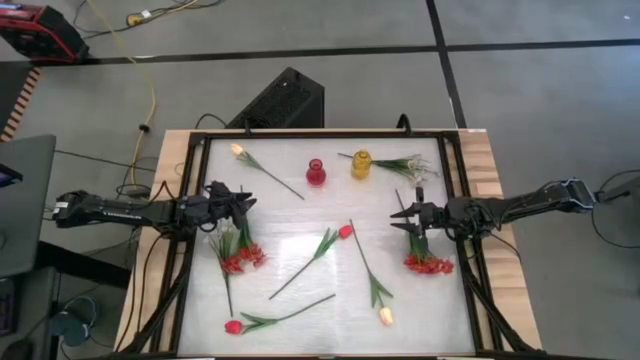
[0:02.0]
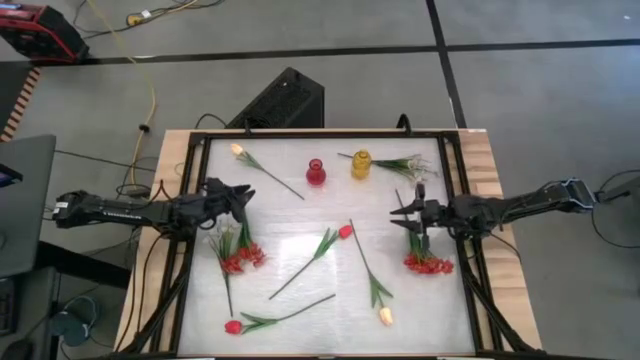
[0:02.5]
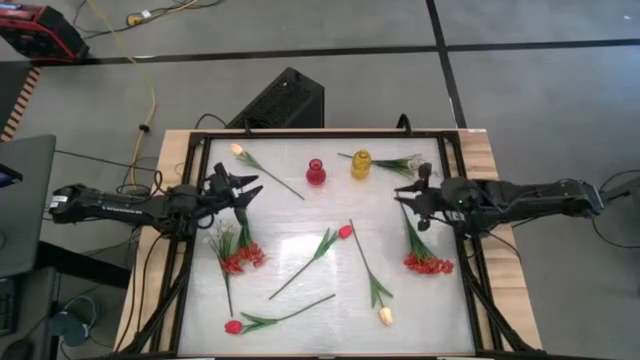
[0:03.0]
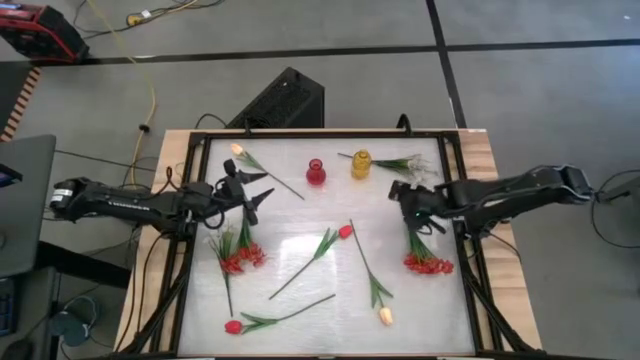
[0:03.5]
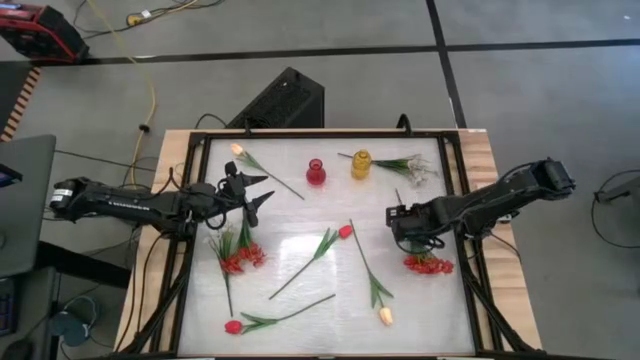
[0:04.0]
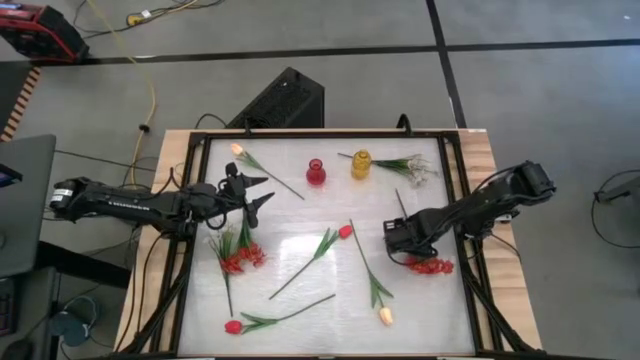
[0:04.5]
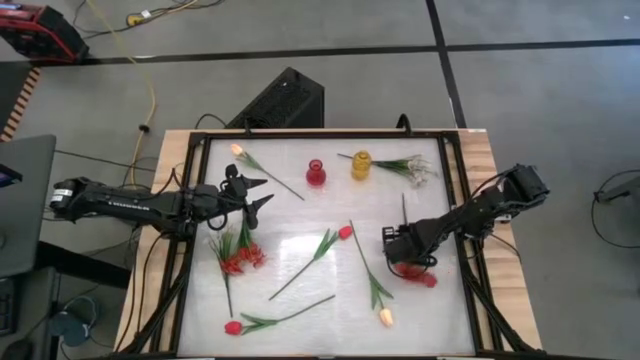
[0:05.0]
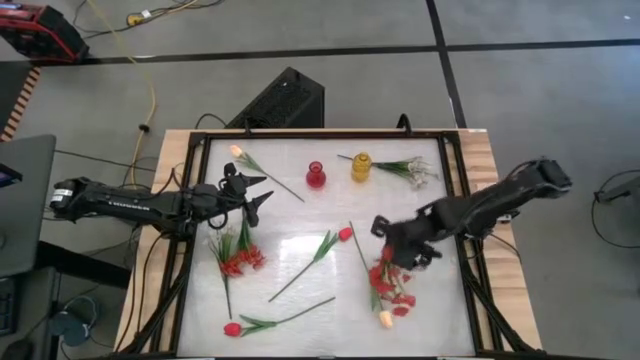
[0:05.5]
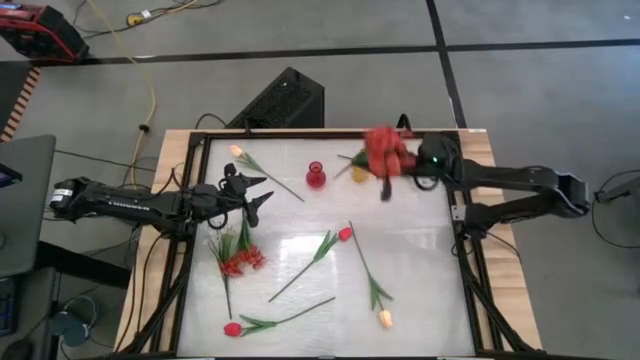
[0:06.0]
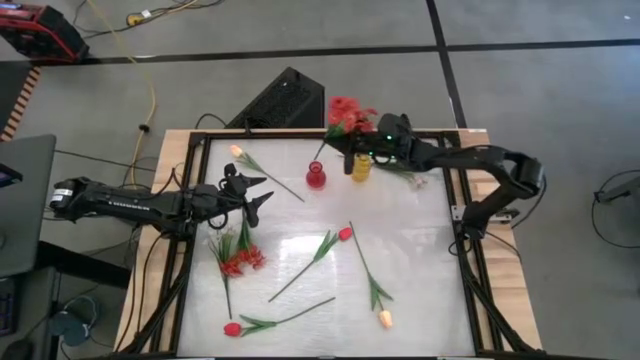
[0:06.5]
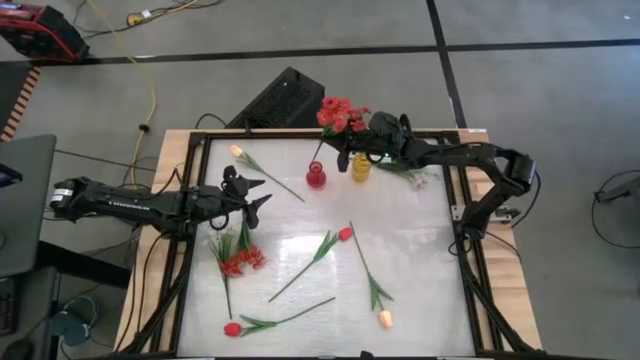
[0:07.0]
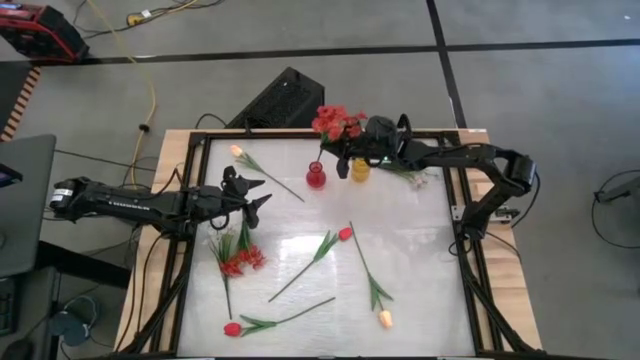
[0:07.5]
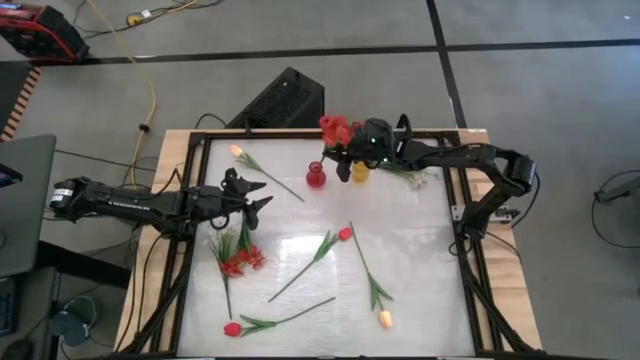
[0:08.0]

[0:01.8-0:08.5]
Task: Sort flowers into vase by color
Put the right red flowers into the red vase

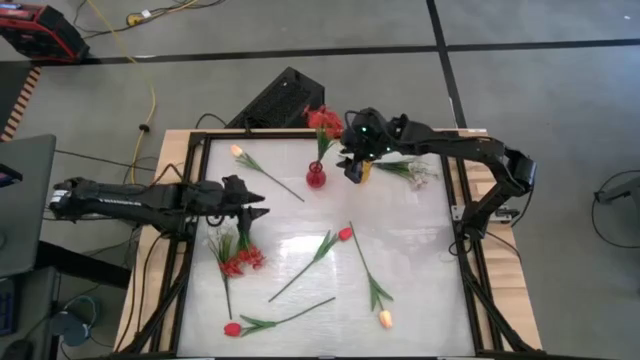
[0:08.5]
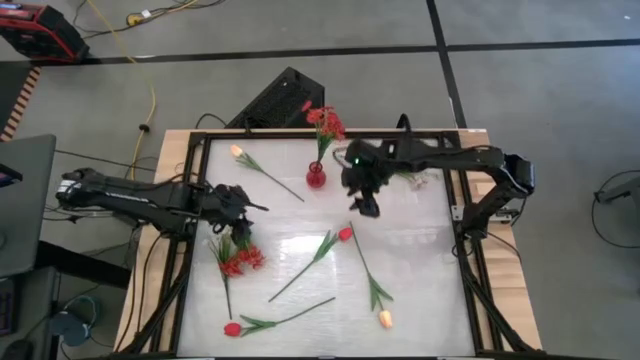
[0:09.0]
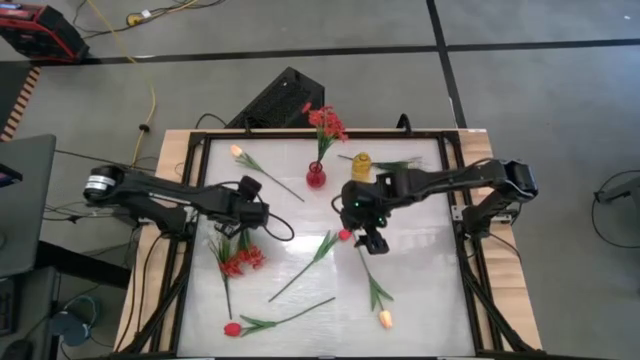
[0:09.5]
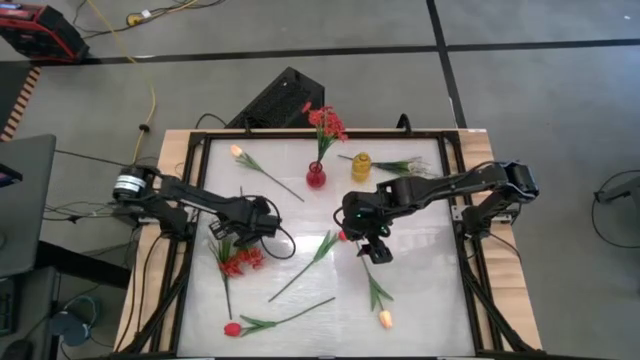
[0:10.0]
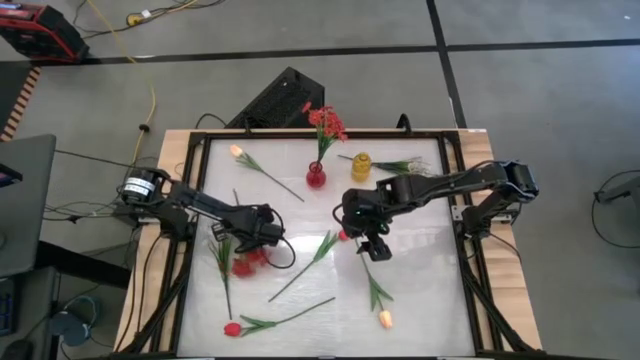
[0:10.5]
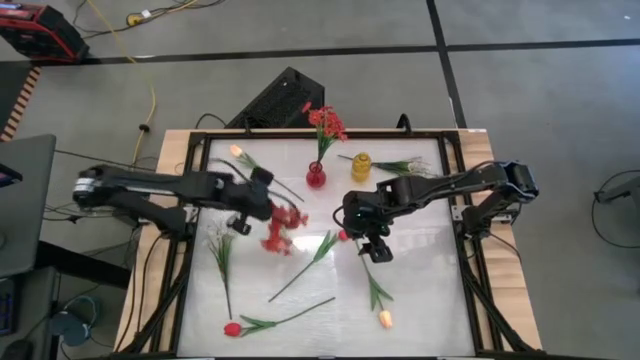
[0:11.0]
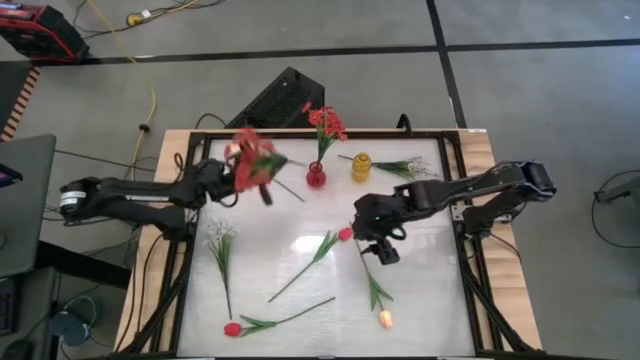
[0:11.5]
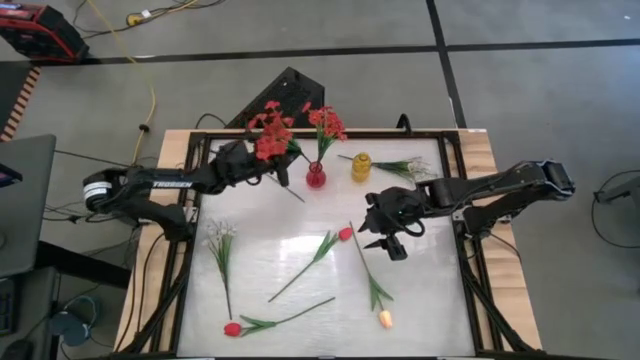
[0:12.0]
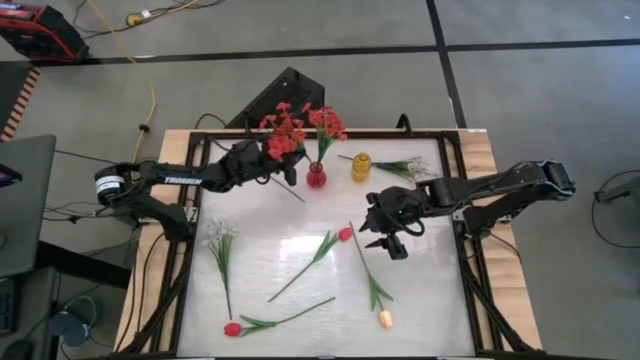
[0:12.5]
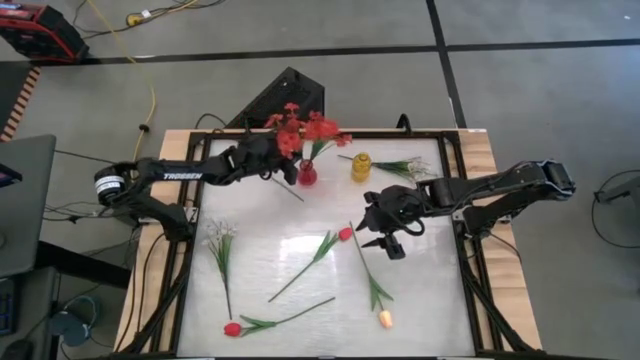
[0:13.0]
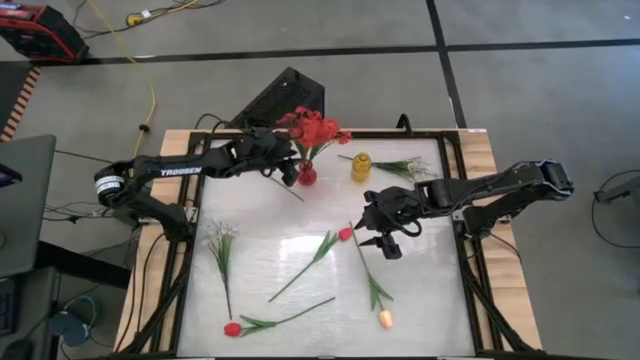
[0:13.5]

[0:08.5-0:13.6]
Put the red flowers into the red vase

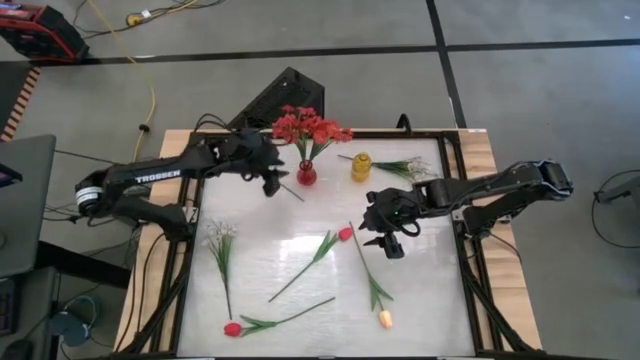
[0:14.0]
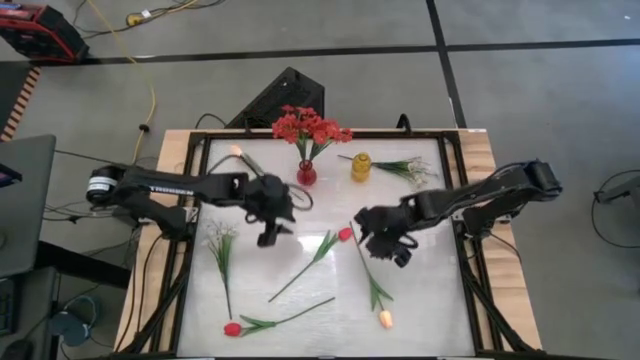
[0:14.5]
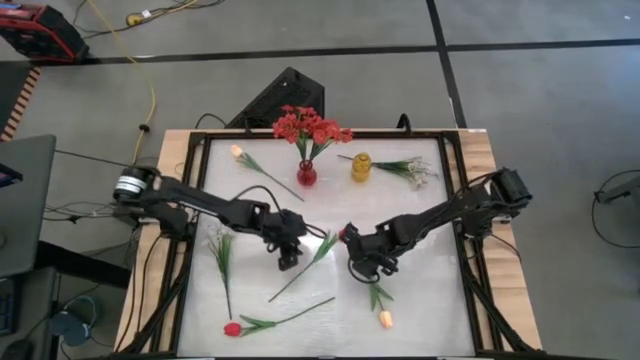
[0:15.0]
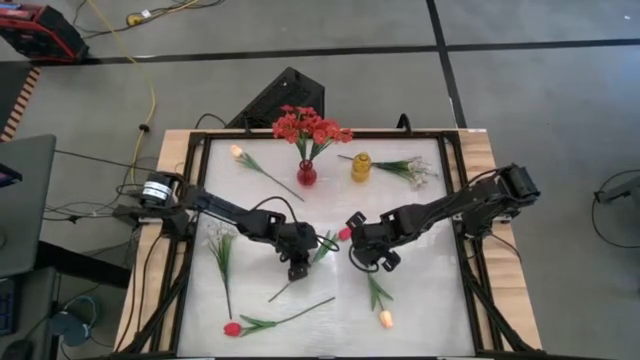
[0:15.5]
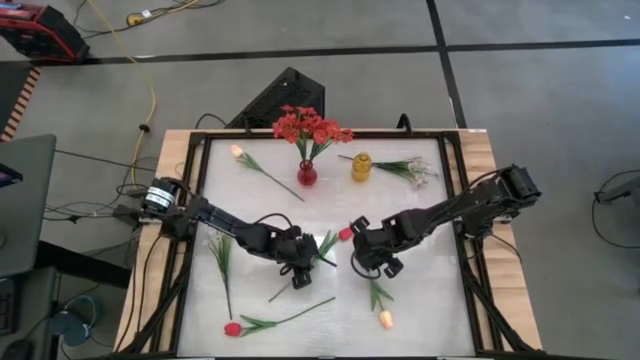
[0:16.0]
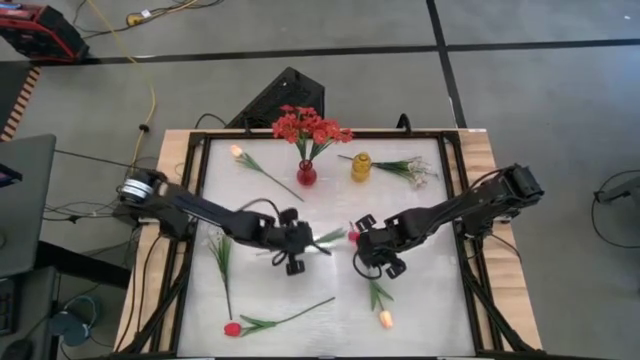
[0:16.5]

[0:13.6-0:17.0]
Put the top red tulip into the red vase

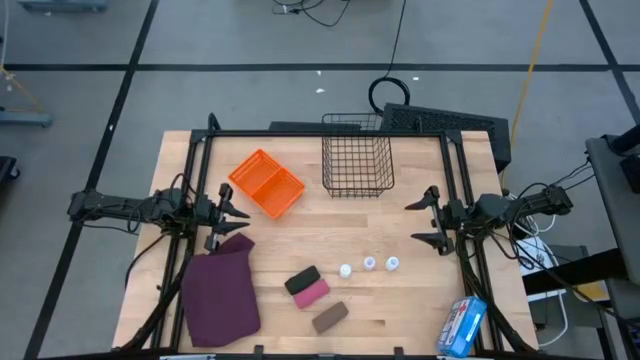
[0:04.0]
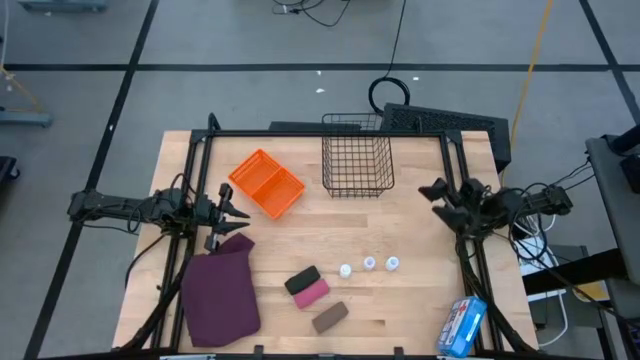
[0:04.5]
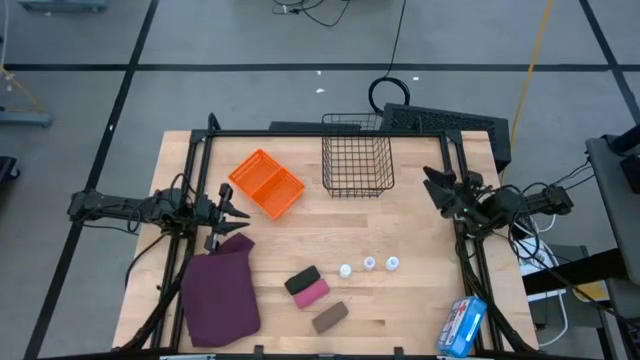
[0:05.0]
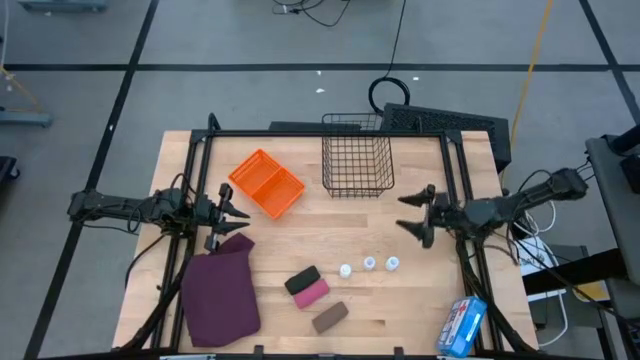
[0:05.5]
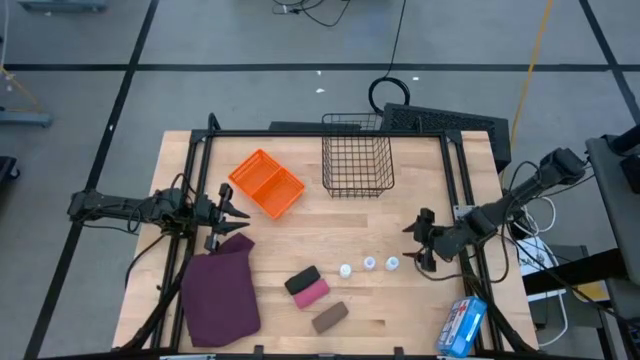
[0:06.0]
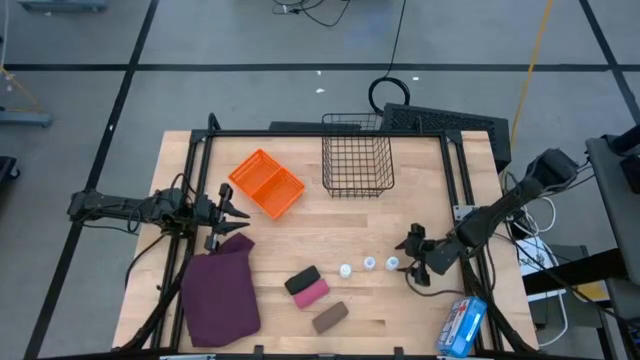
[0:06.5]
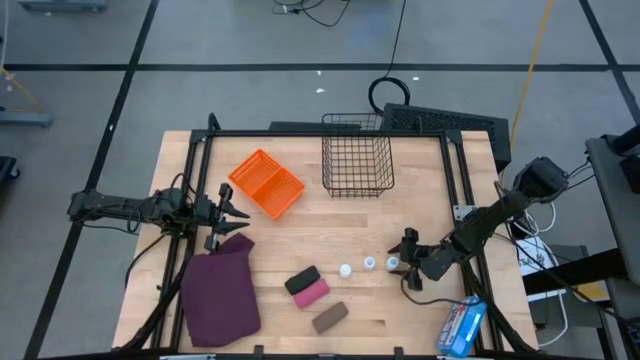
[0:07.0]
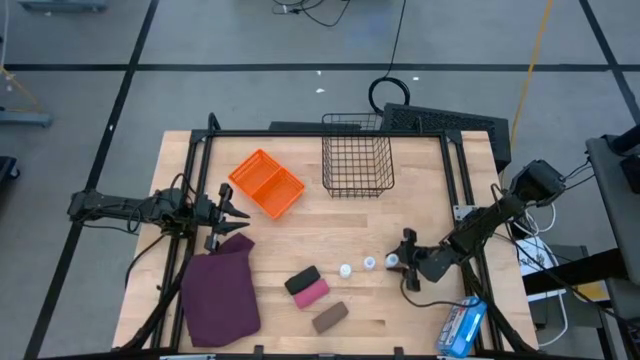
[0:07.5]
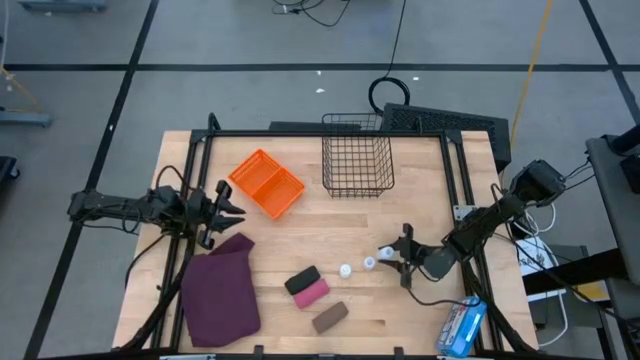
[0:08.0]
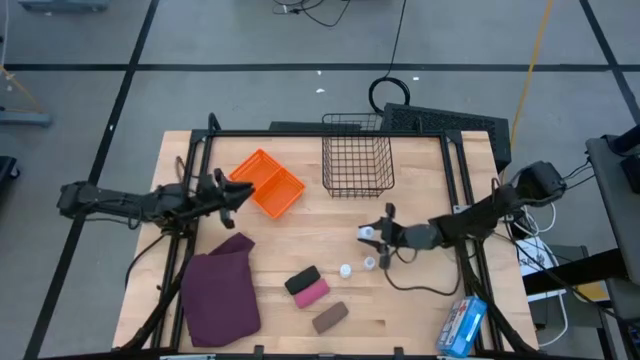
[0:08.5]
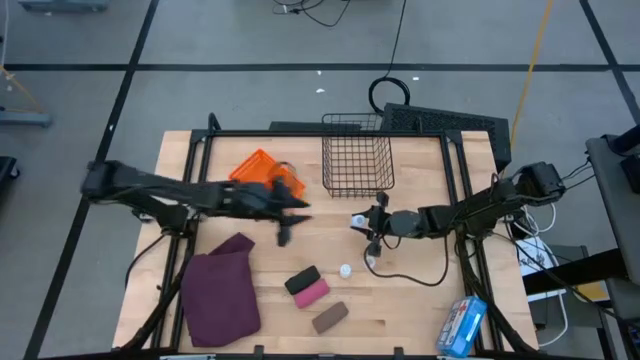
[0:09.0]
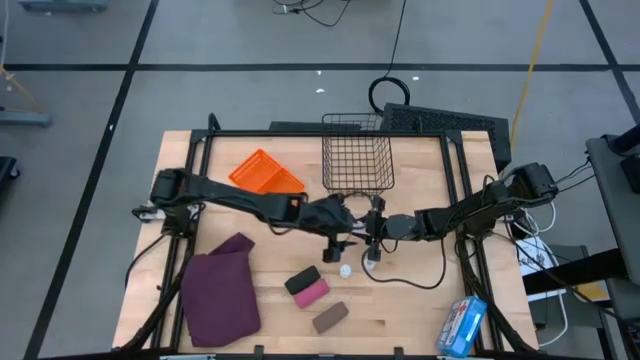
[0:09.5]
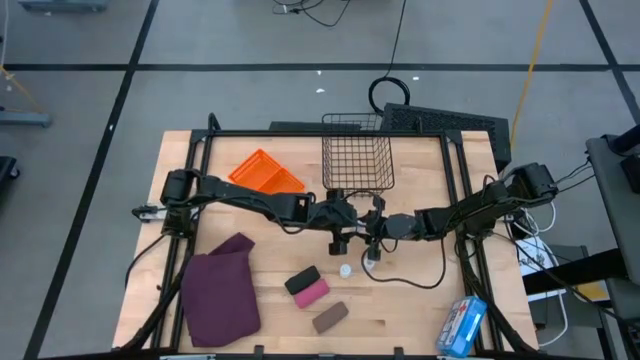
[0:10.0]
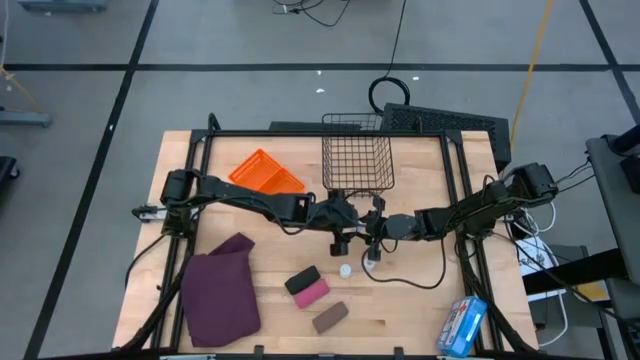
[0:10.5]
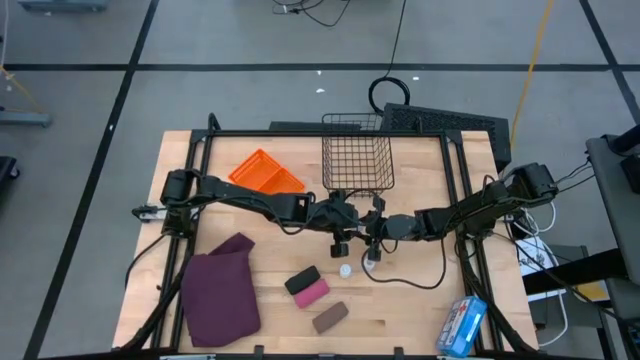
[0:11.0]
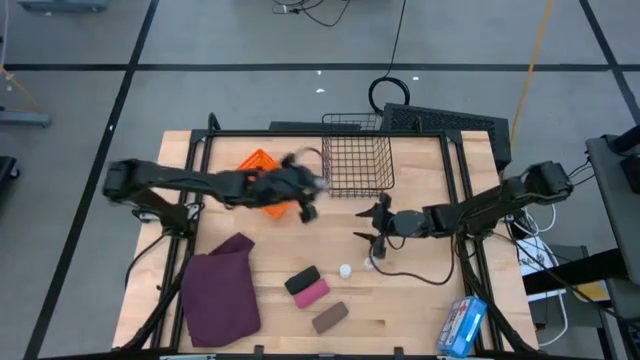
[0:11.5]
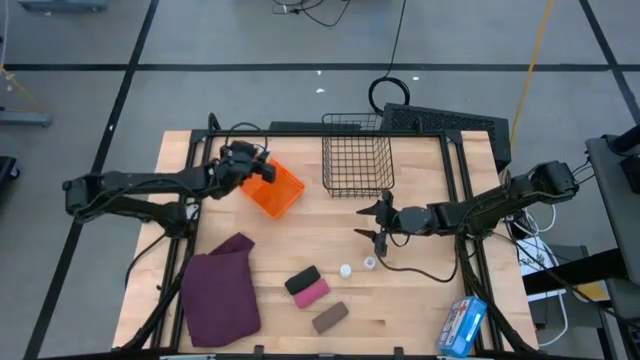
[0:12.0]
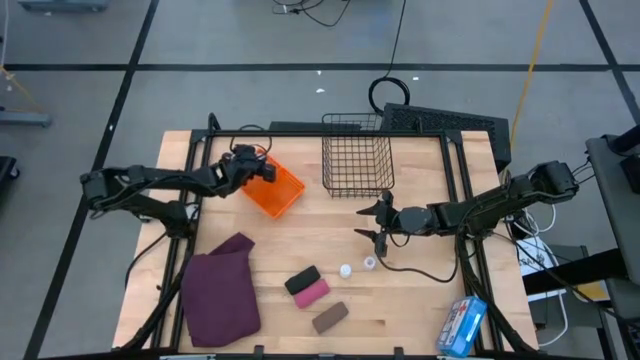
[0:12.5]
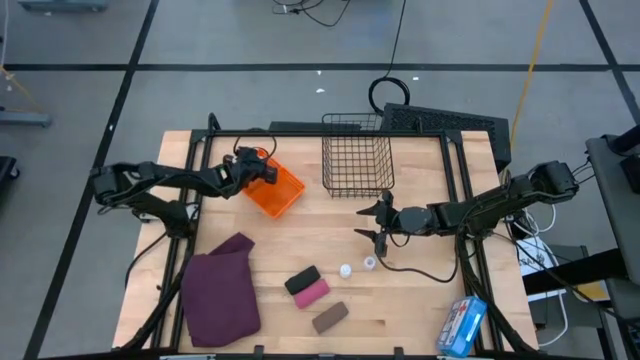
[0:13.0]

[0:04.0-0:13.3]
Task: Pick & Place Medicine items
Put the white pill bottle into the top orange basket
